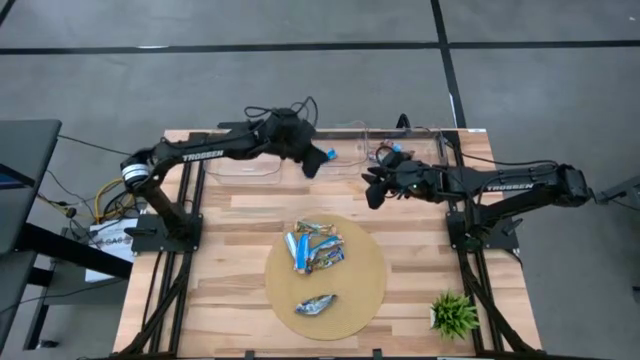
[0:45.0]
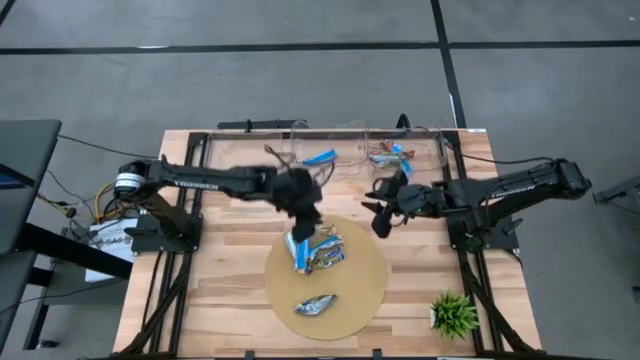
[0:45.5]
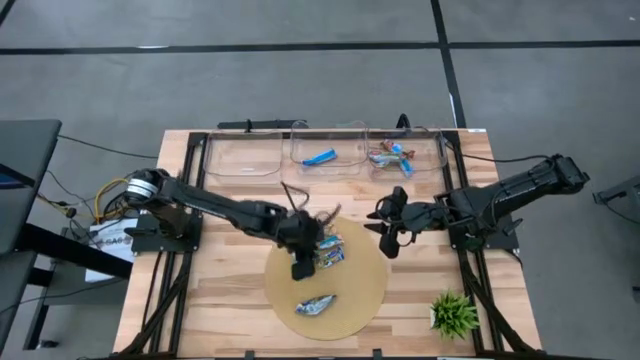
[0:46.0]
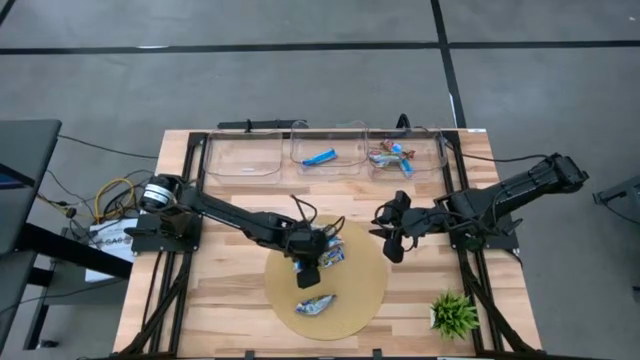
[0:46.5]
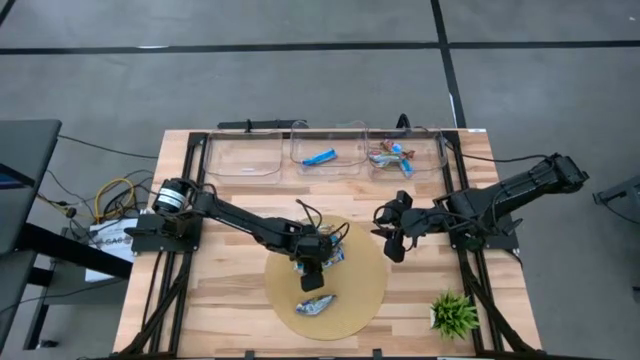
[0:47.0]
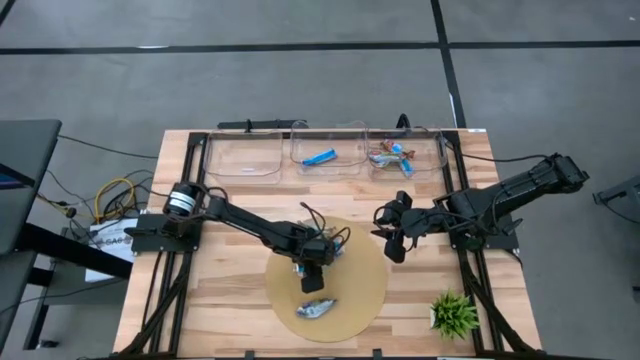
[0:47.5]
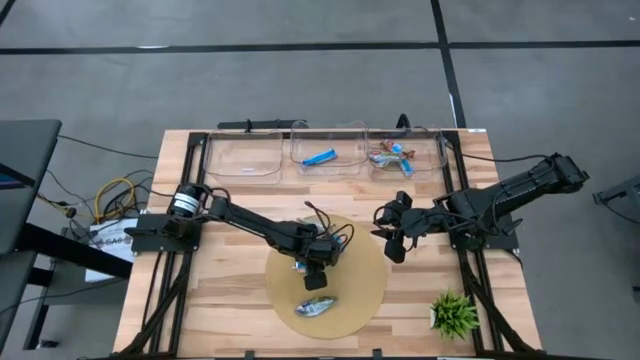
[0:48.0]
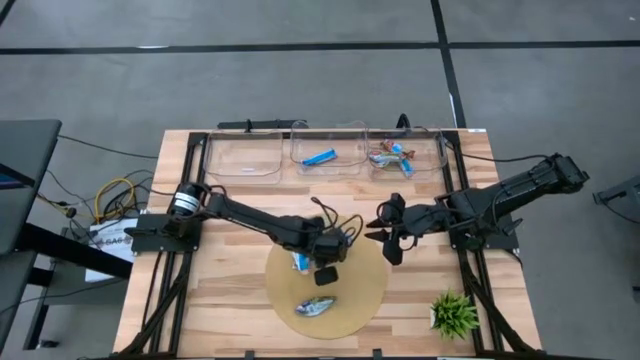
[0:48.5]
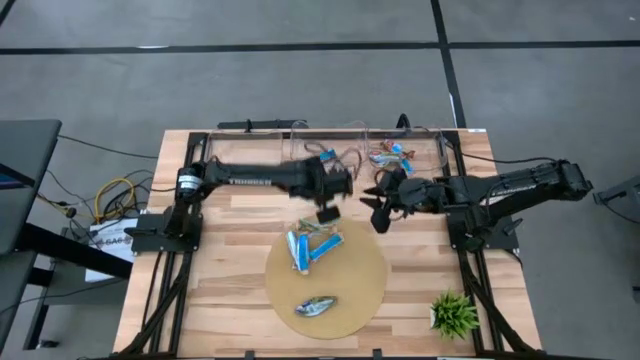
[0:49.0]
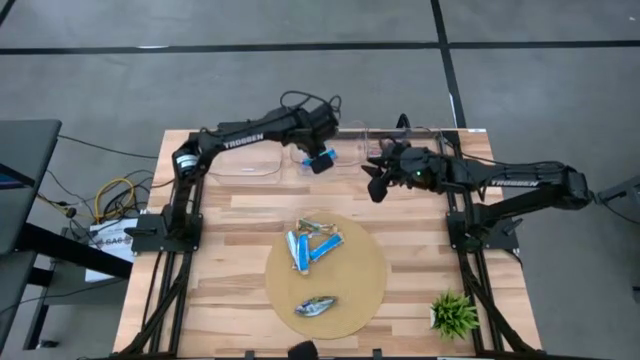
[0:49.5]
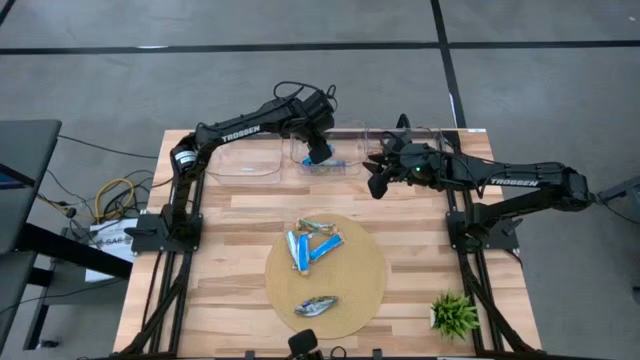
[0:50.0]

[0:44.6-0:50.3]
Task: Pick and place Granola Bars by type
Put the blue granola bar into the center transparent bin

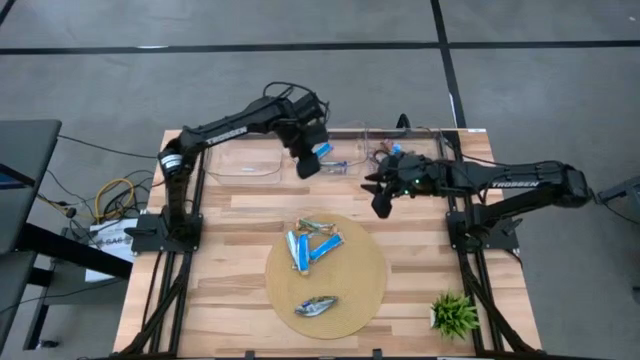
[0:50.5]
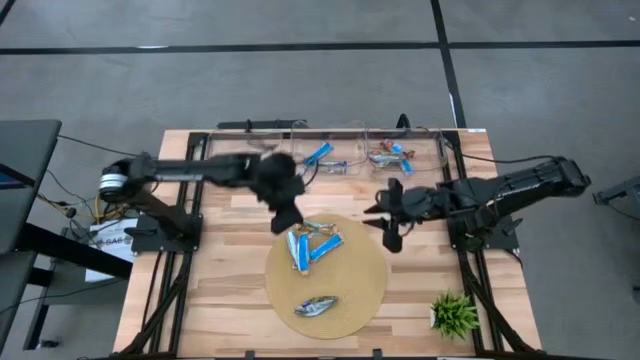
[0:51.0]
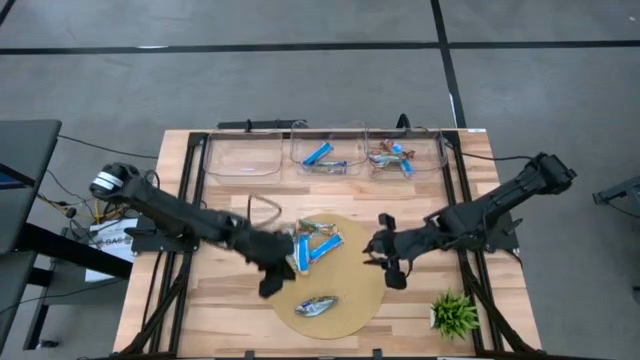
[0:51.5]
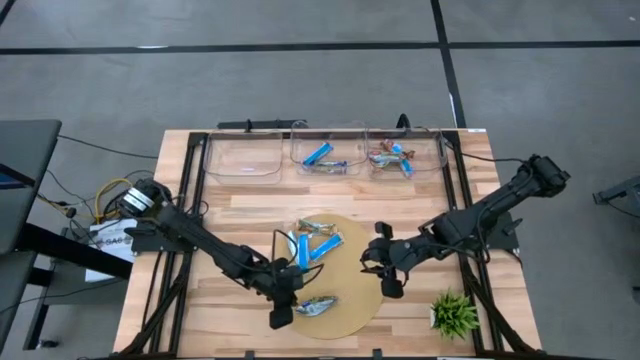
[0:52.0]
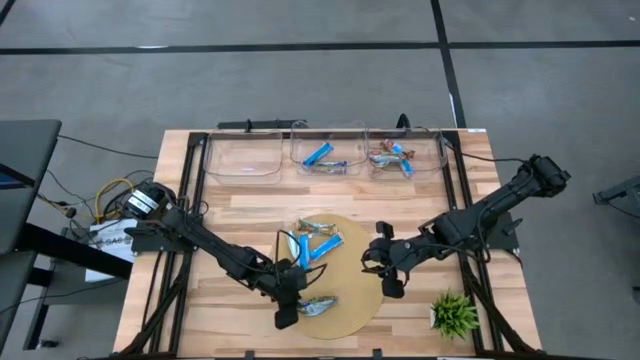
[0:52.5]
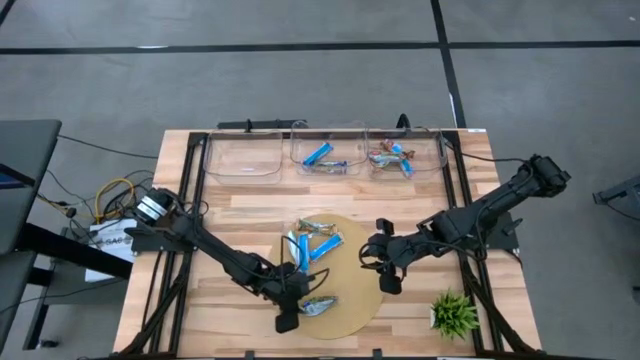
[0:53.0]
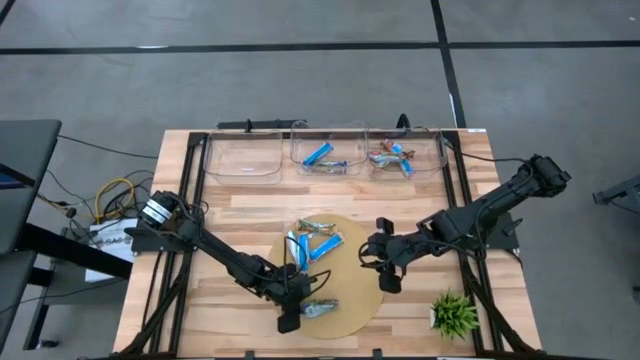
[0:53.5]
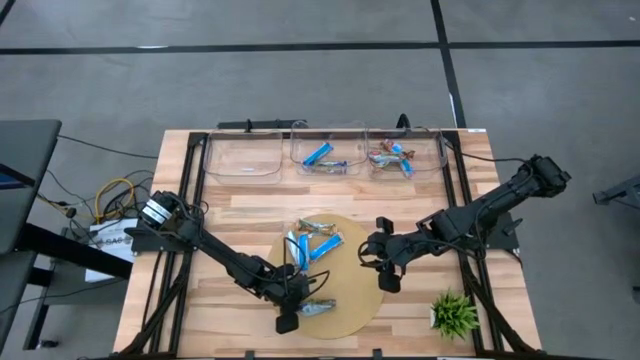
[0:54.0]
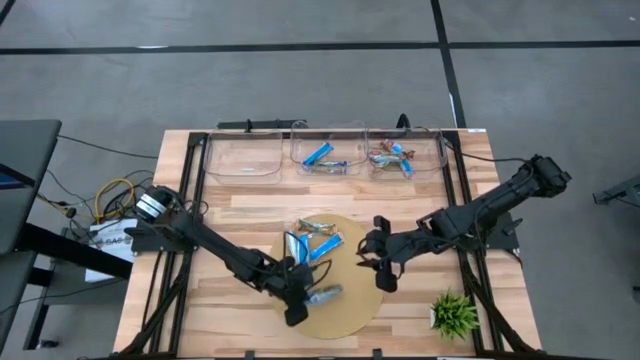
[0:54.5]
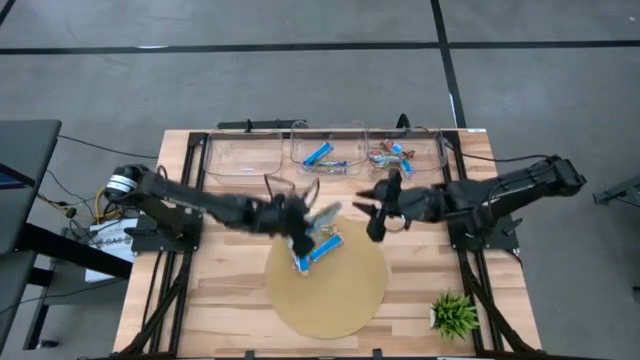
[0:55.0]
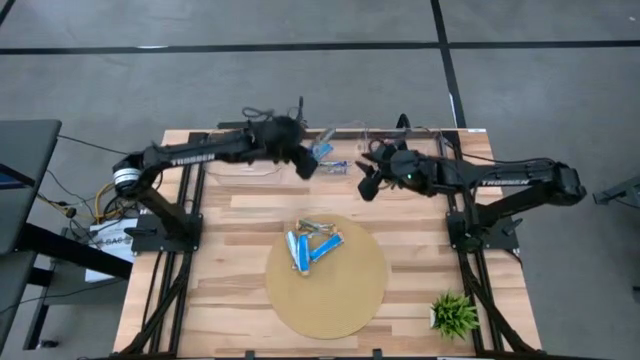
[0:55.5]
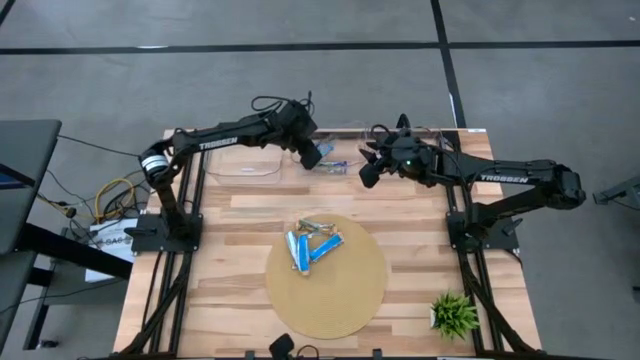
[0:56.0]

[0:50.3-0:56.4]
Put the blue granola bar into the center transparent bin

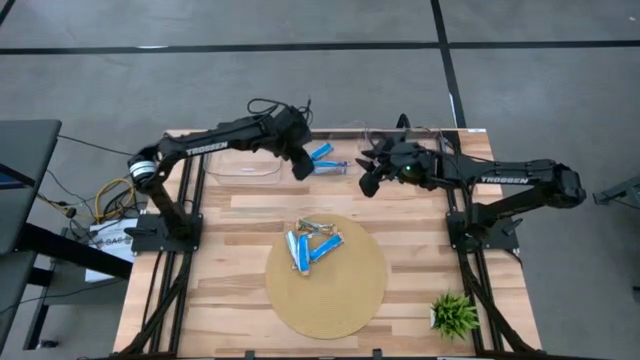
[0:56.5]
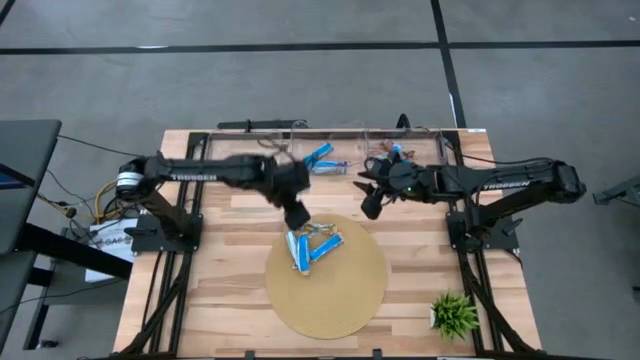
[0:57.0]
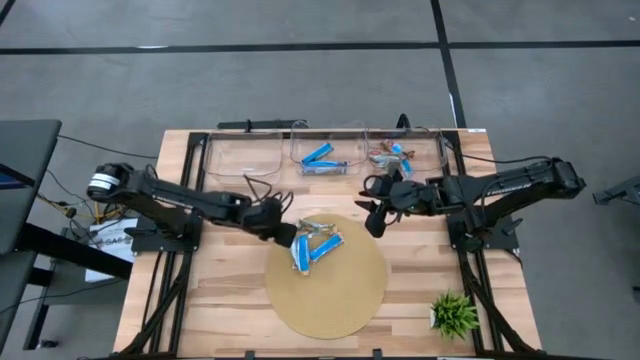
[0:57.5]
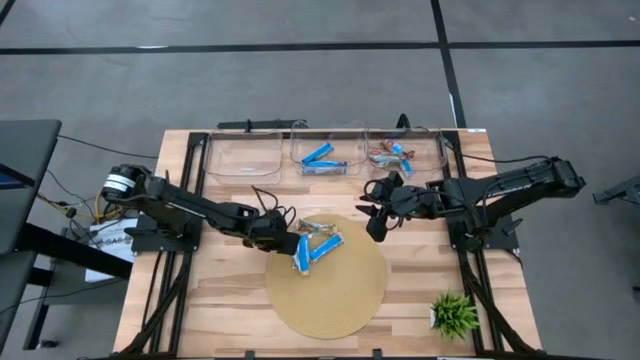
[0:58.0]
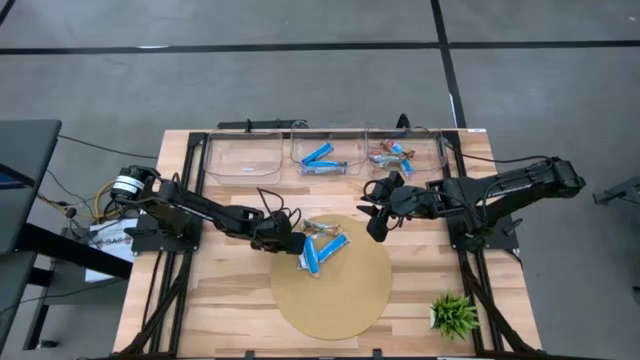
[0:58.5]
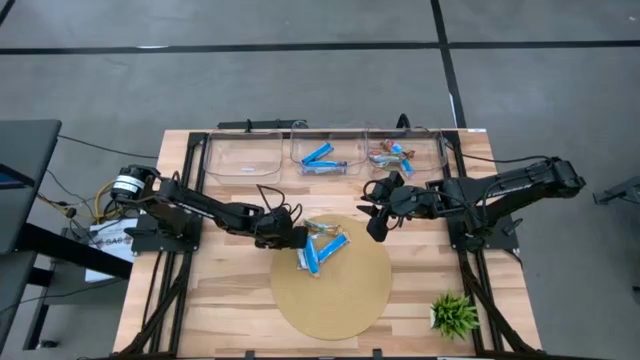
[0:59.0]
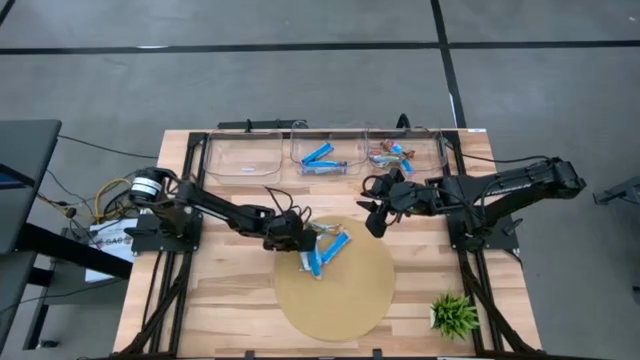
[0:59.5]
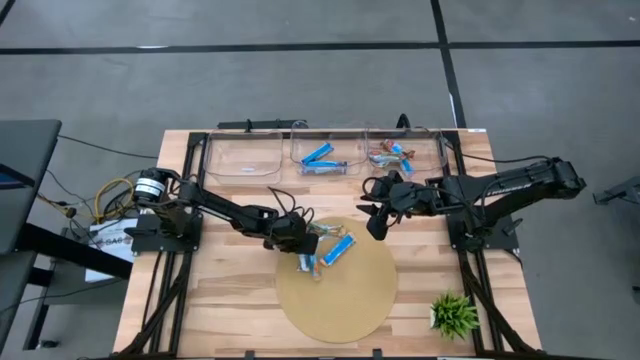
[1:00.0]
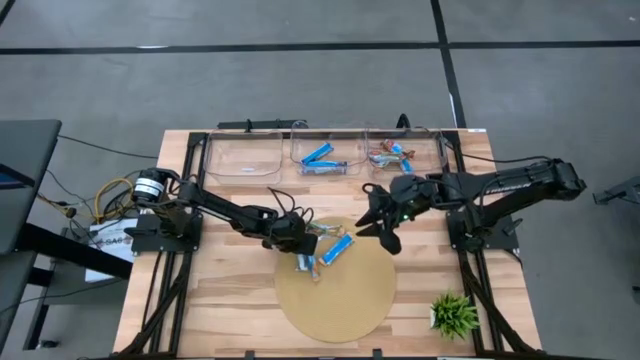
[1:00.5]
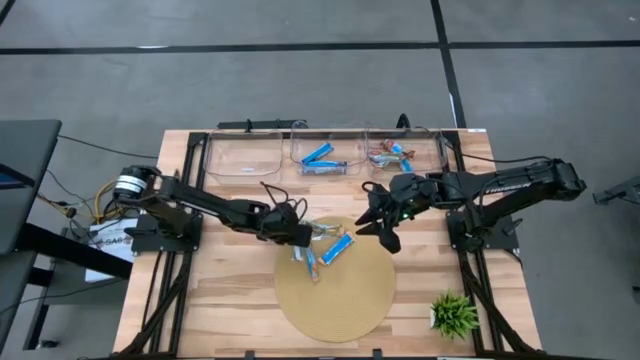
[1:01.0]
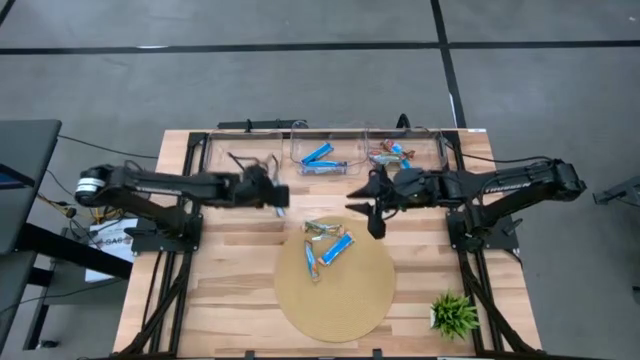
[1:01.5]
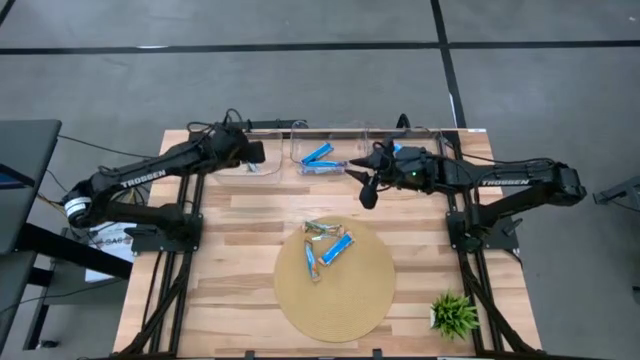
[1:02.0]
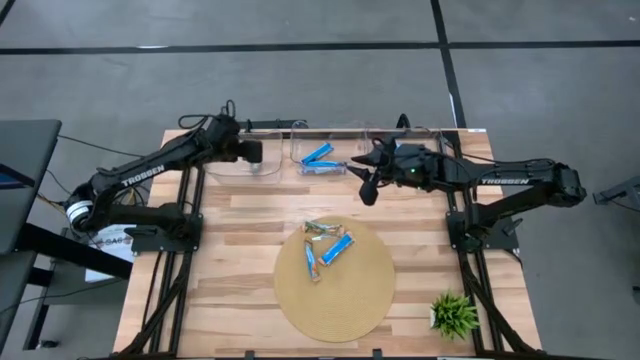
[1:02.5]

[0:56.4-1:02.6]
Put the orange granola bar into the left transparent bin

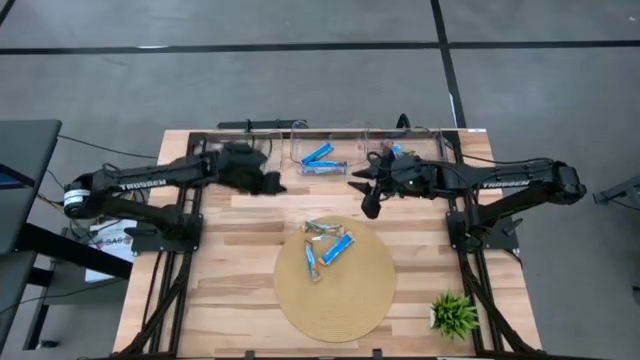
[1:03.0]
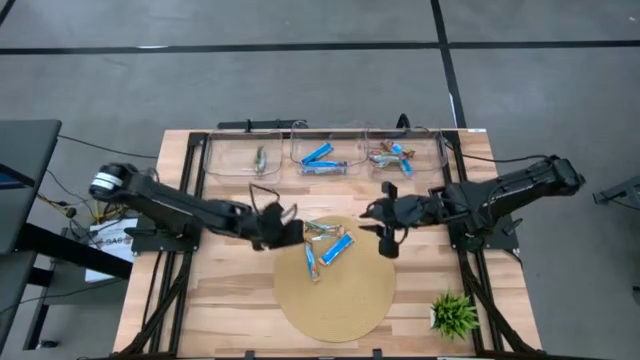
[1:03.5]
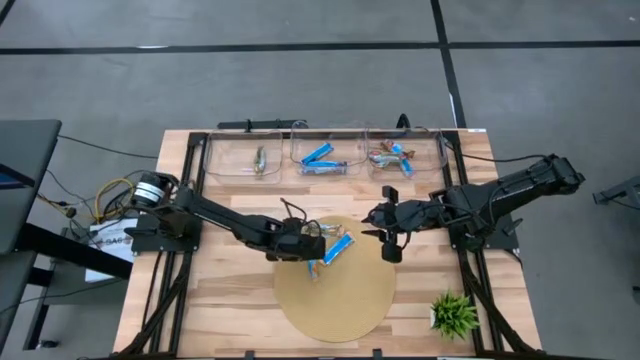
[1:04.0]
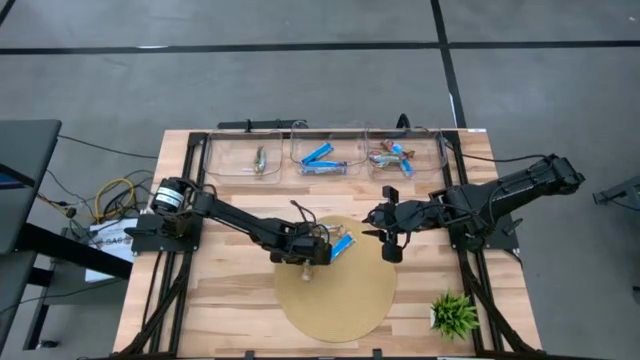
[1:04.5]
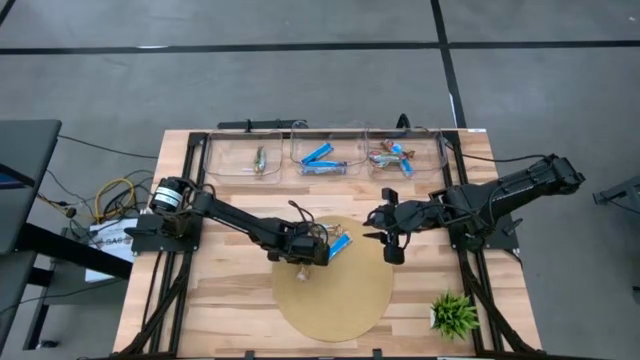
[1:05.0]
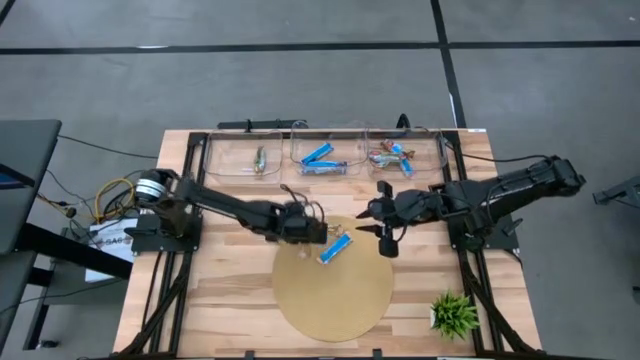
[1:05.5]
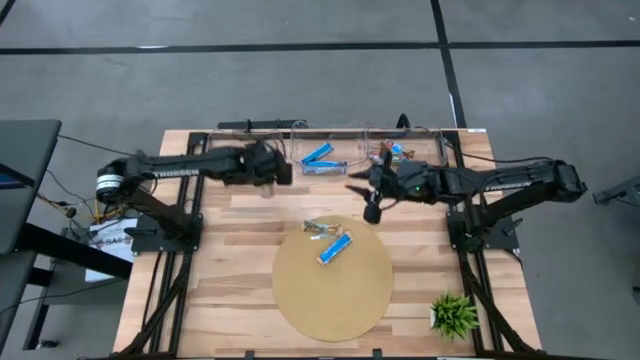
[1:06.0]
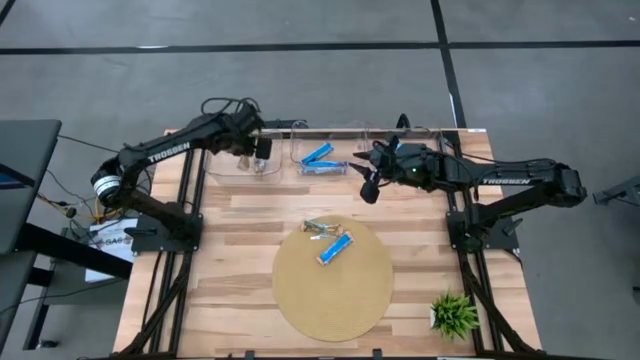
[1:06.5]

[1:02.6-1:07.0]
Put the orange granola bar into the left transparent bin
